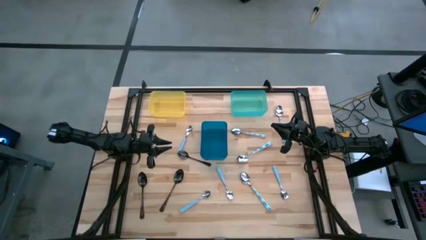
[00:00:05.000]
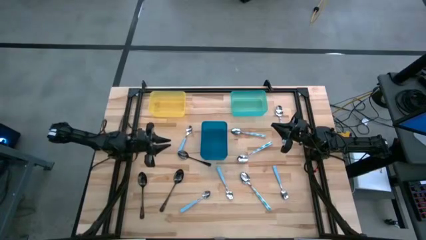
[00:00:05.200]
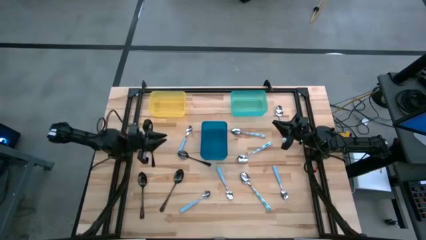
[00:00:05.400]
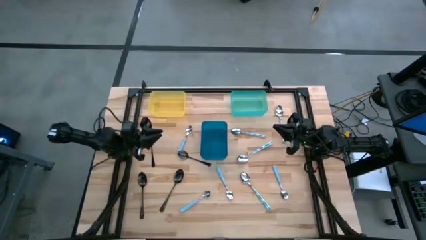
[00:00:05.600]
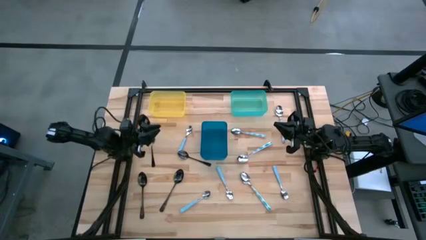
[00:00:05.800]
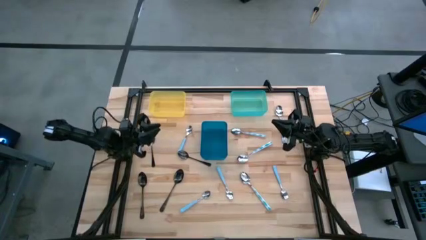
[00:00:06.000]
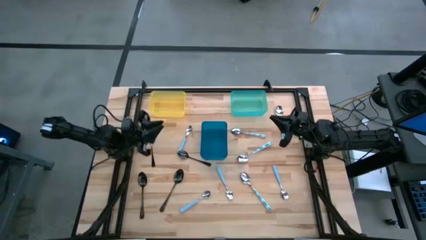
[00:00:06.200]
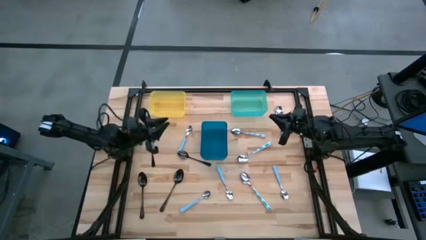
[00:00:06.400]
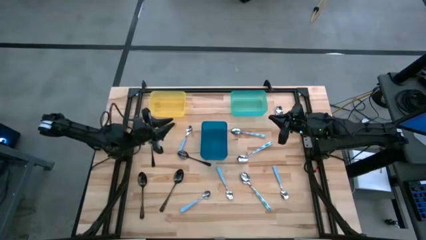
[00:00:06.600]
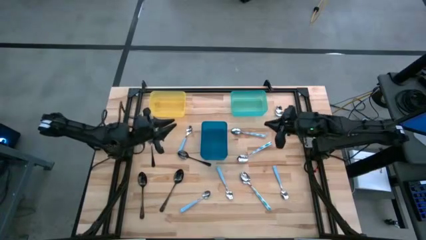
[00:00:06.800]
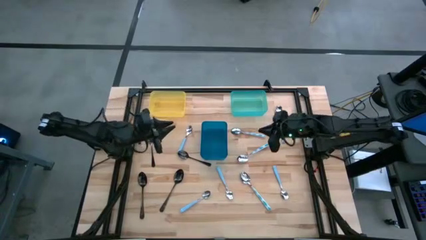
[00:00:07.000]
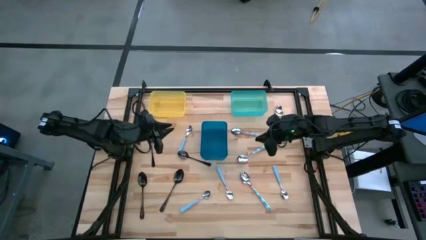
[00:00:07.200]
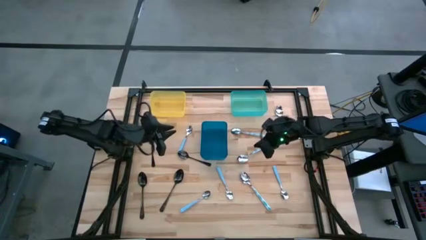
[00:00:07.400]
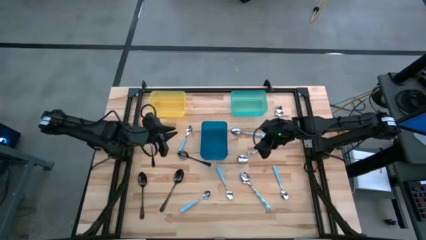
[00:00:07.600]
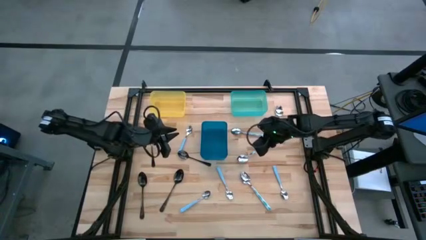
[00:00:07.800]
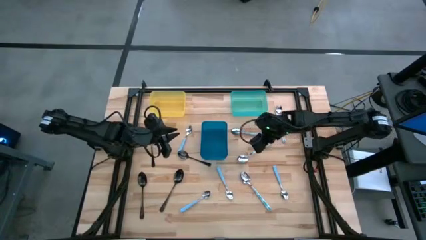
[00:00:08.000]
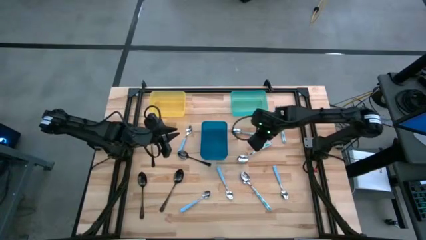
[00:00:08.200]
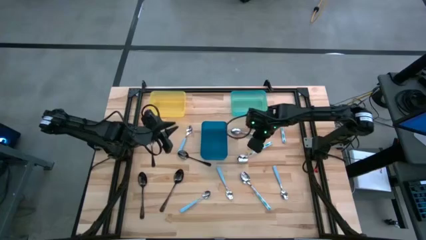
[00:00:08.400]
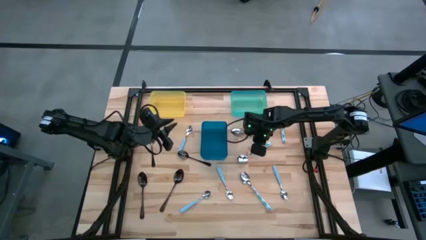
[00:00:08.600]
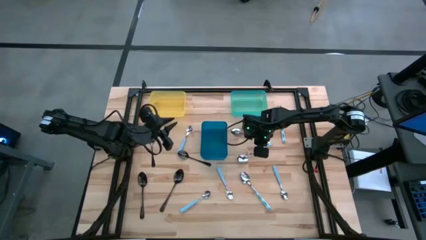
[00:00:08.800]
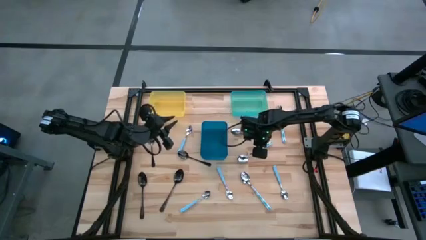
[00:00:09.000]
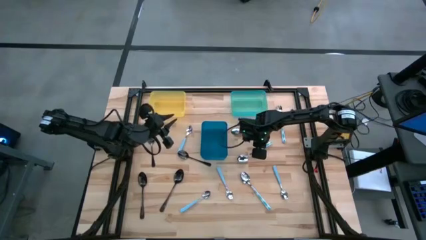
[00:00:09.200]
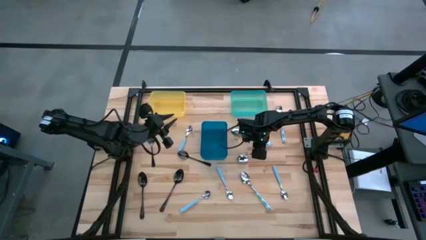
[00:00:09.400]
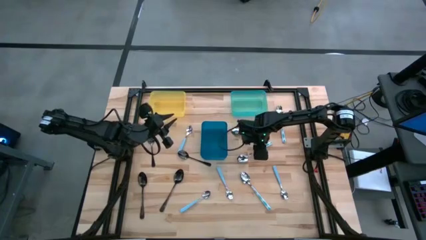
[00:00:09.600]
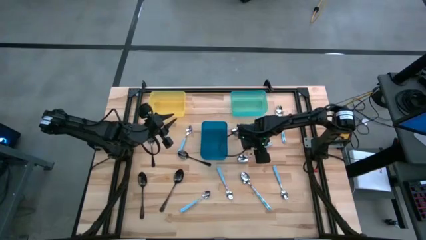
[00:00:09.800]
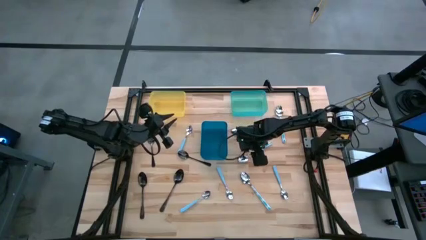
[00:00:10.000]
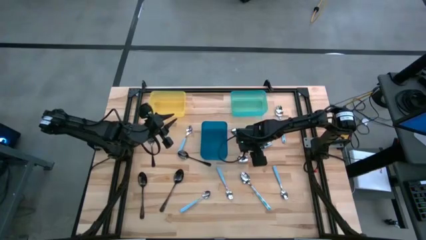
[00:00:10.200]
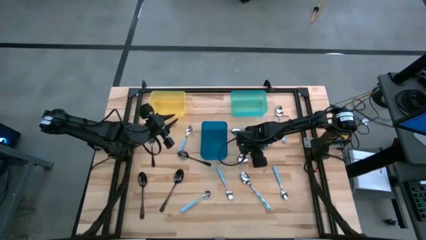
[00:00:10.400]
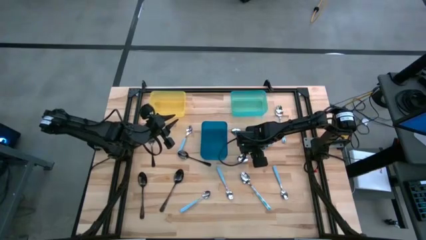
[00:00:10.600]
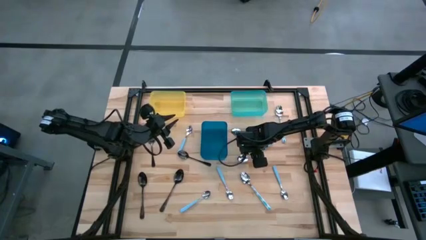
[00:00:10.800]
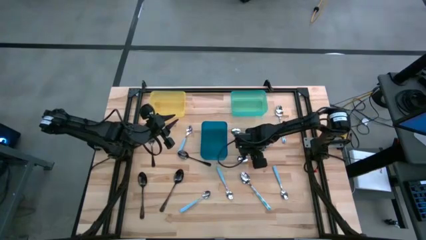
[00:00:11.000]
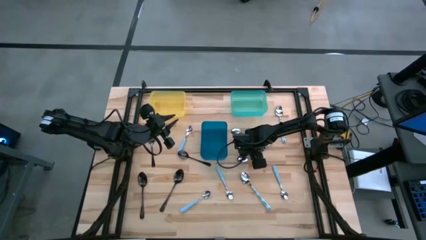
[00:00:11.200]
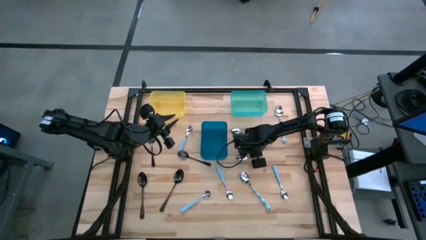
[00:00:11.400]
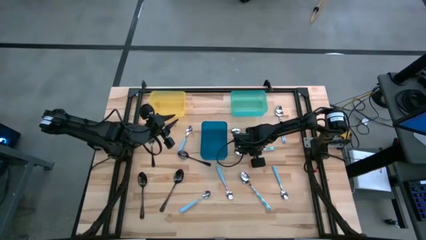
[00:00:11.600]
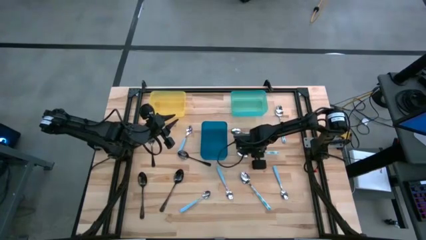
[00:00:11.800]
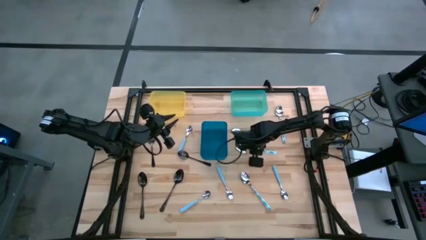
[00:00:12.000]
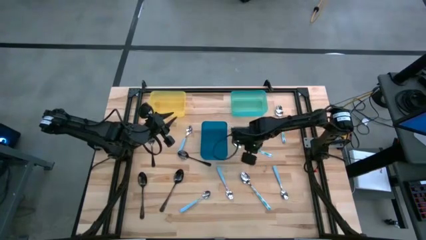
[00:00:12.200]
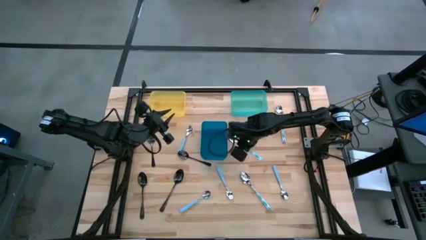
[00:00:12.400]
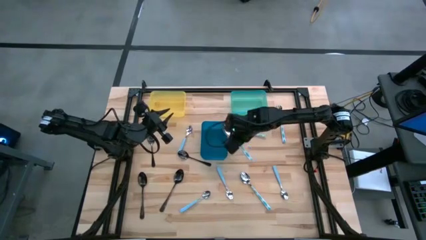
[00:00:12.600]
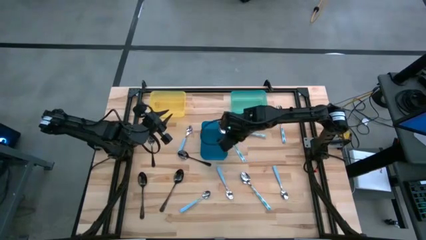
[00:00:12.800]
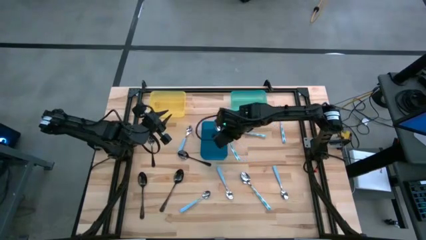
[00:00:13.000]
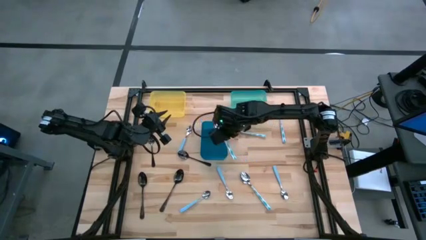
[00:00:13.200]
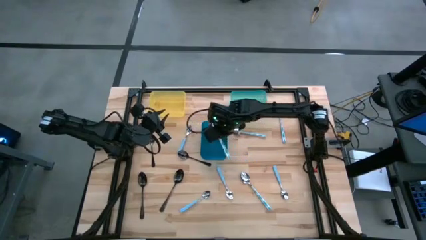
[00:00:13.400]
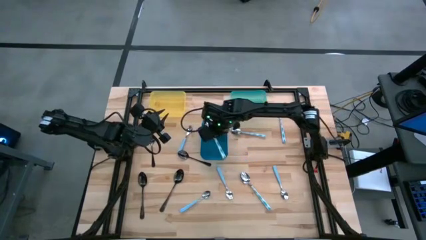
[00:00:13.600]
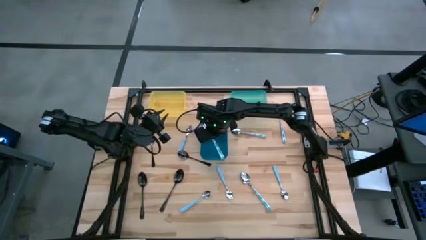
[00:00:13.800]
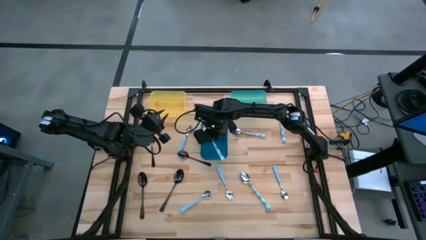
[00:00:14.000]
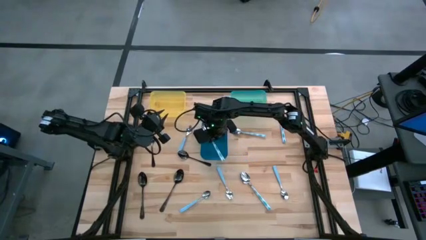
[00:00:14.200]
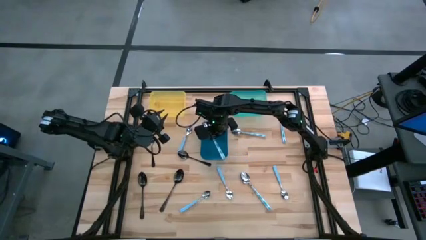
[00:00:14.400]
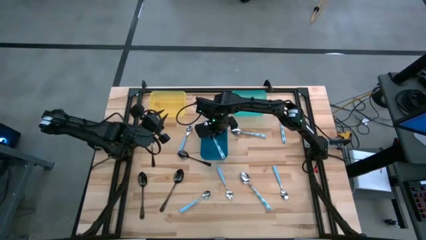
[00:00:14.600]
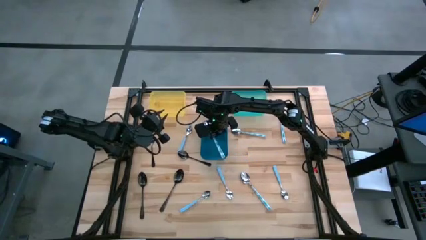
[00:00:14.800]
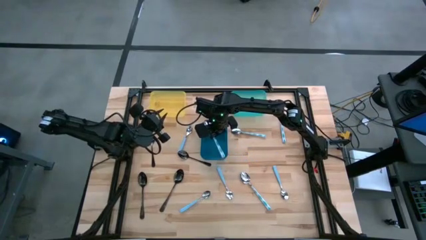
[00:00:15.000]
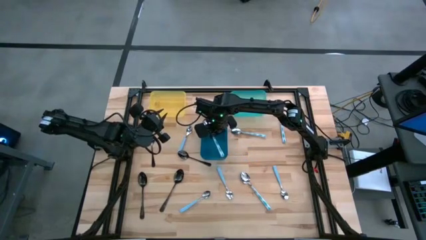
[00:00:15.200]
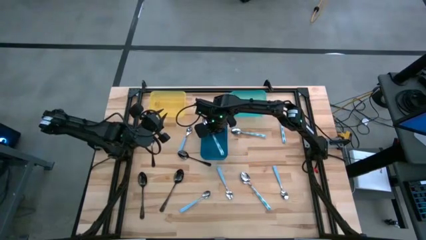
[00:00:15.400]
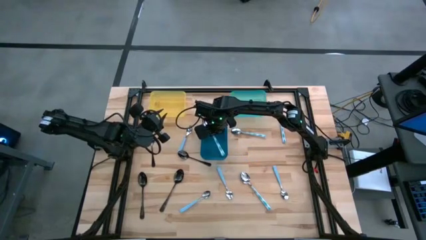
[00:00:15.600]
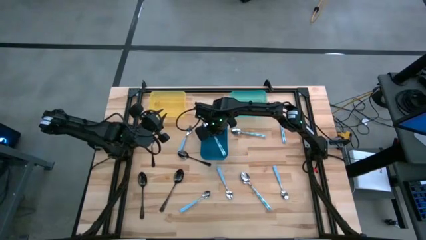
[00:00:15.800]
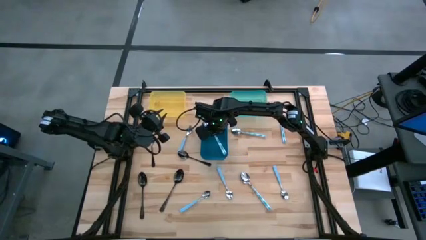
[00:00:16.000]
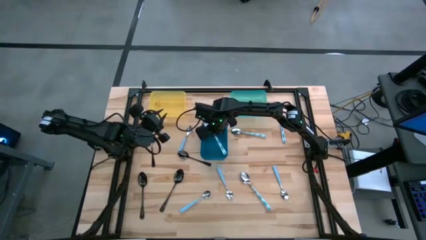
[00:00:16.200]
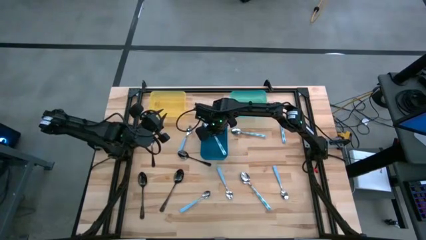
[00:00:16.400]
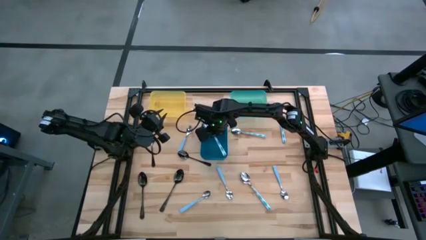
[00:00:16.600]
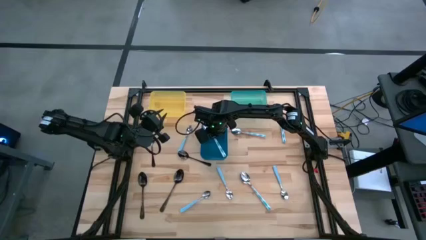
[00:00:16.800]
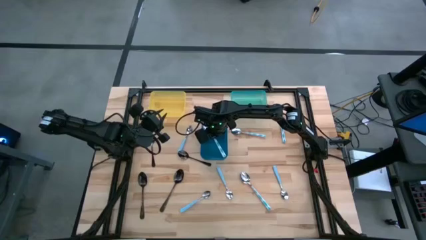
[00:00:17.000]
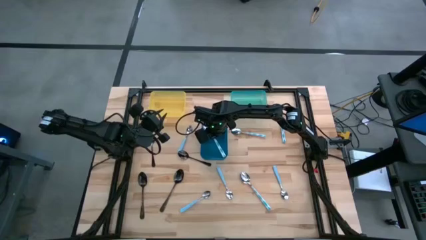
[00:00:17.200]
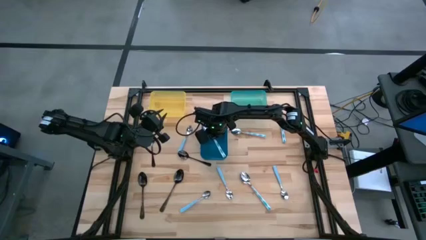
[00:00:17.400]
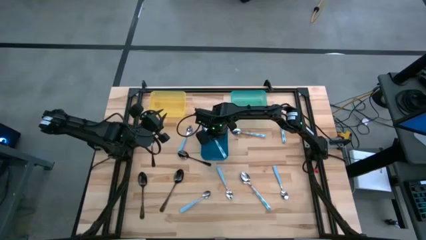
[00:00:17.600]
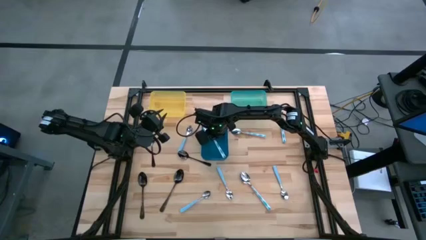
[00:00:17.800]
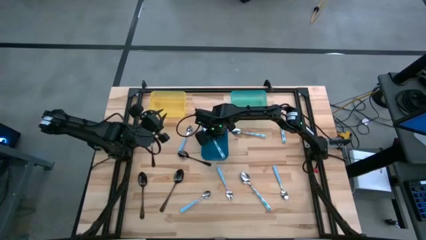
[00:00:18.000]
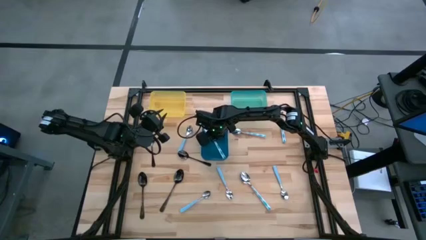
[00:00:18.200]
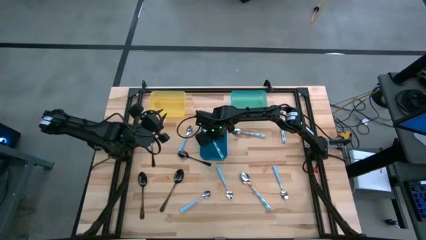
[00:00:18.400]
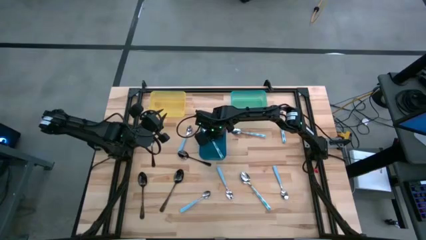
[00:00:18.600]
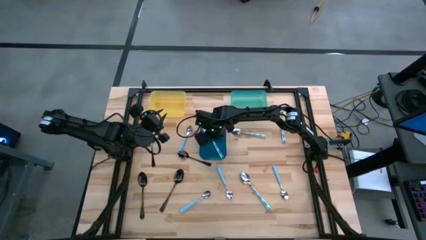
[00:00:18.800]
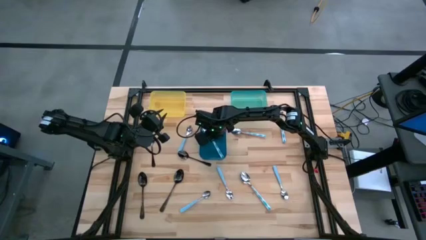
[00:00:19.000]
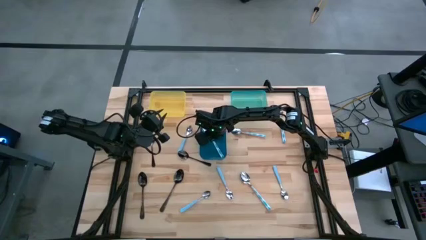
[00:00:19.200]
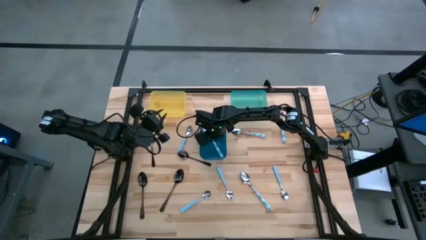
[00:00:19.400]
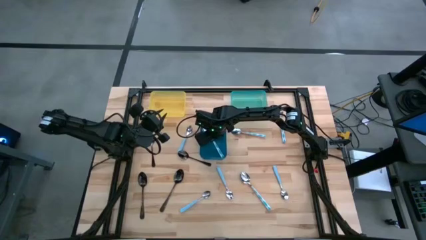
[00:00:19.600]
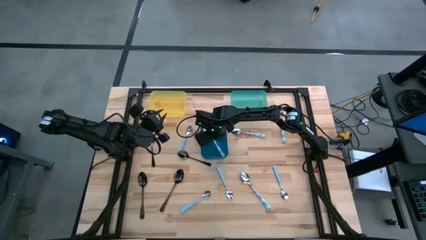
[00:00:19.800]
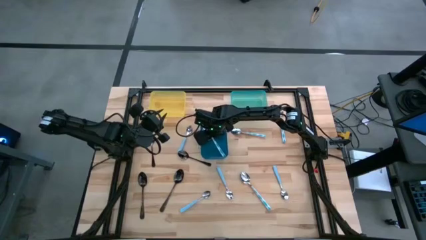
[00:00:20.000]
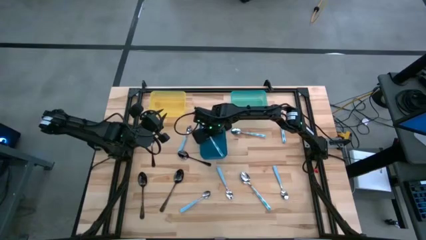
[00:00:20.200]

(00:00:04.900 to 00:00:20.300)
Task: Sort silverware by color (type)
Put the white patterned spoon into the blue bin
